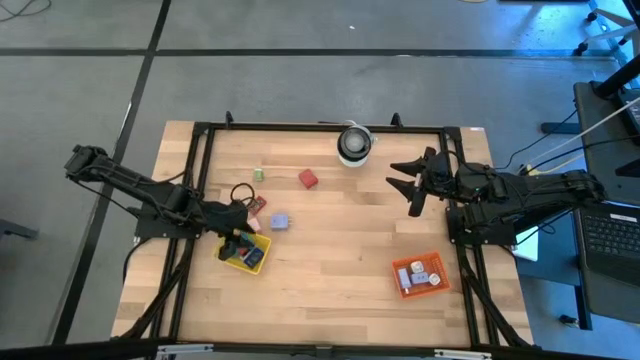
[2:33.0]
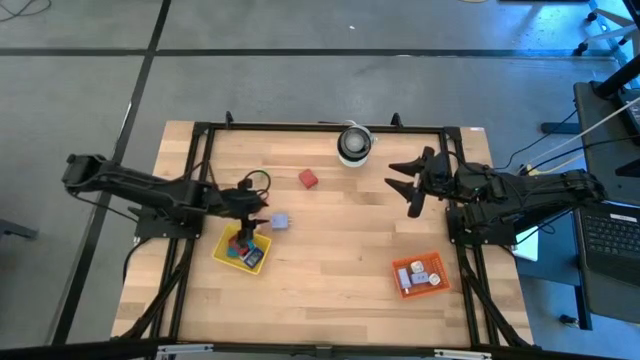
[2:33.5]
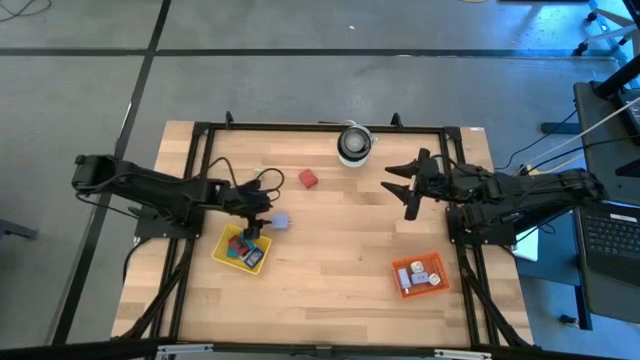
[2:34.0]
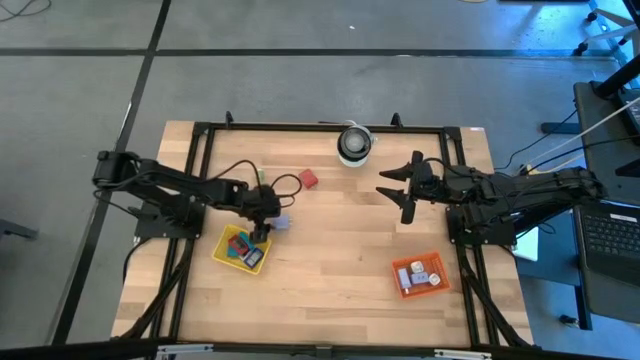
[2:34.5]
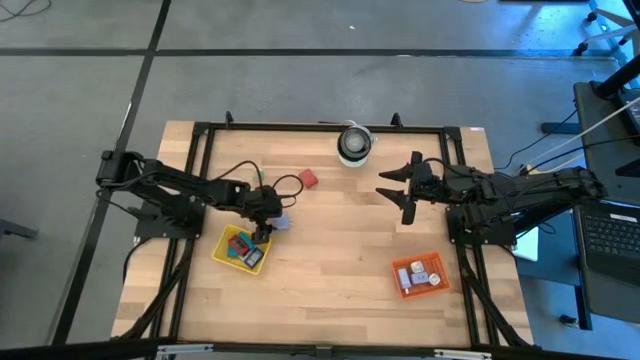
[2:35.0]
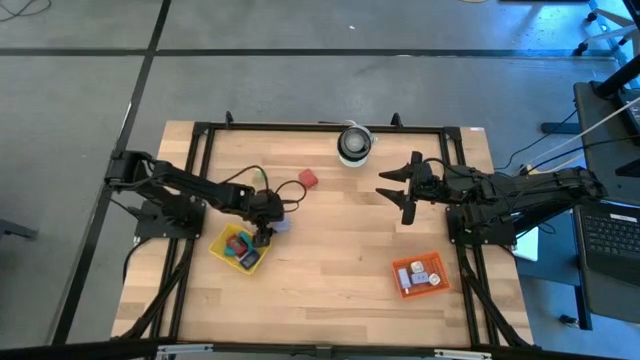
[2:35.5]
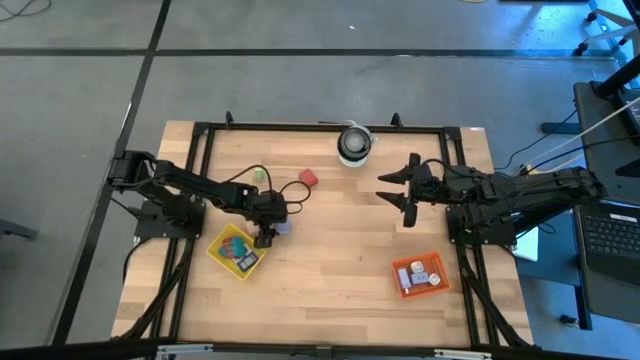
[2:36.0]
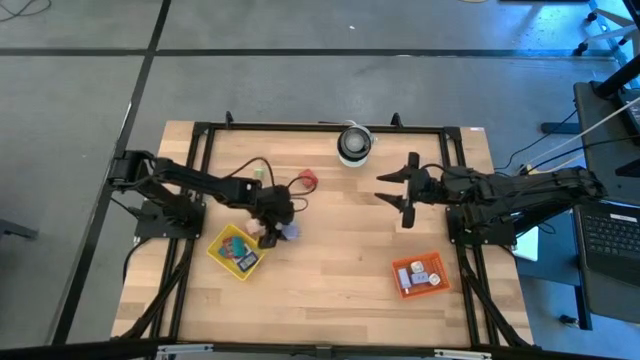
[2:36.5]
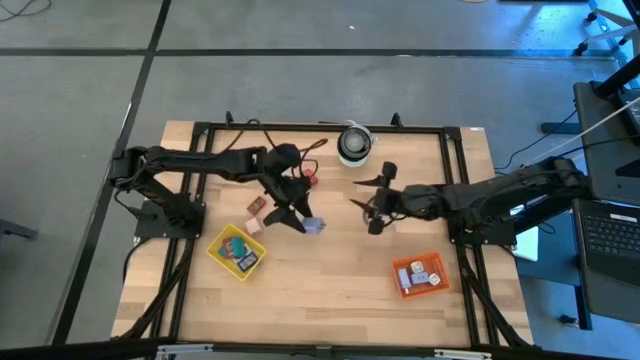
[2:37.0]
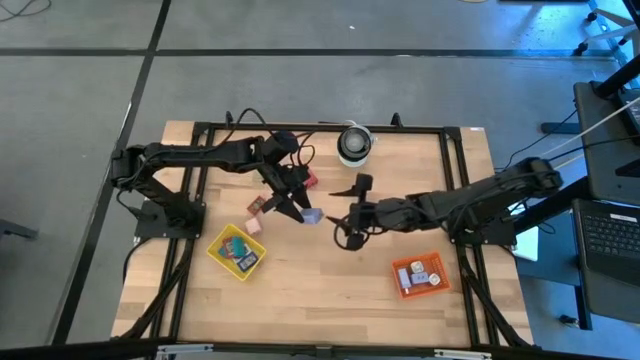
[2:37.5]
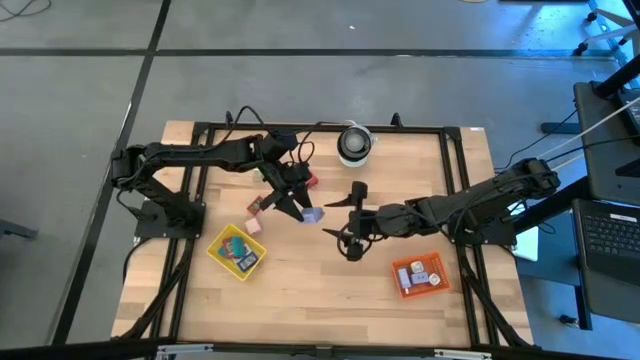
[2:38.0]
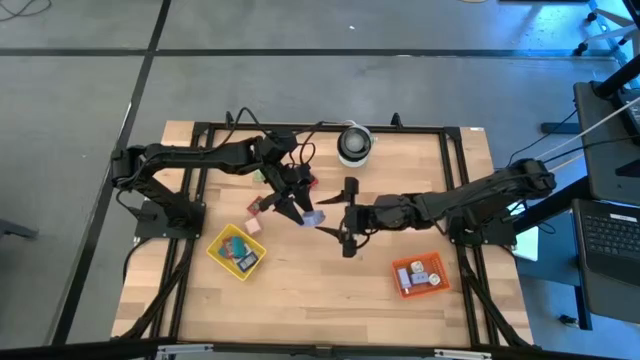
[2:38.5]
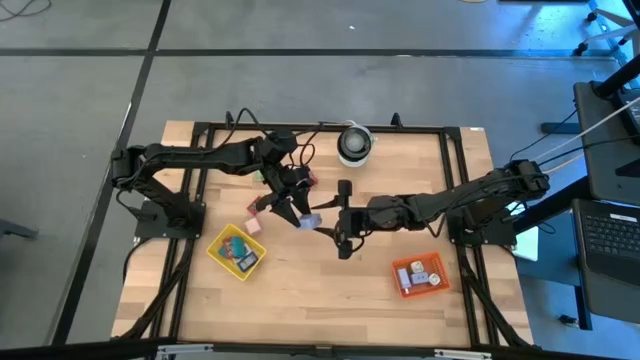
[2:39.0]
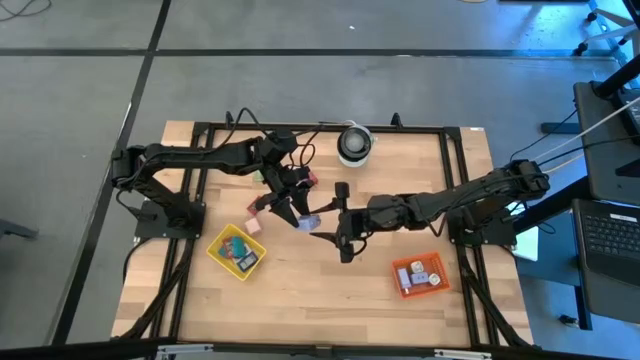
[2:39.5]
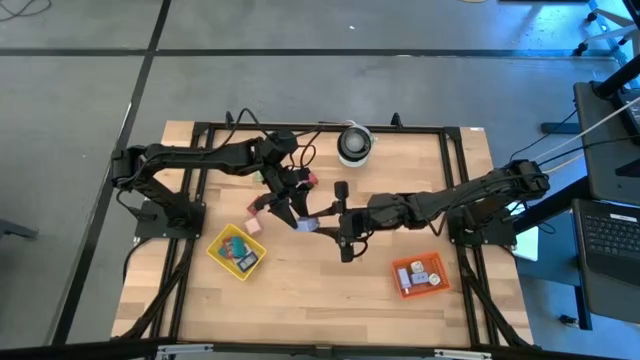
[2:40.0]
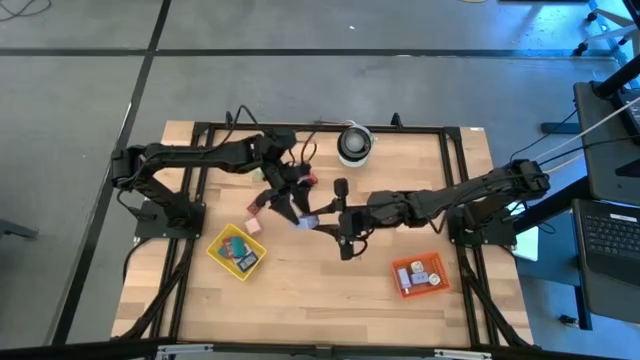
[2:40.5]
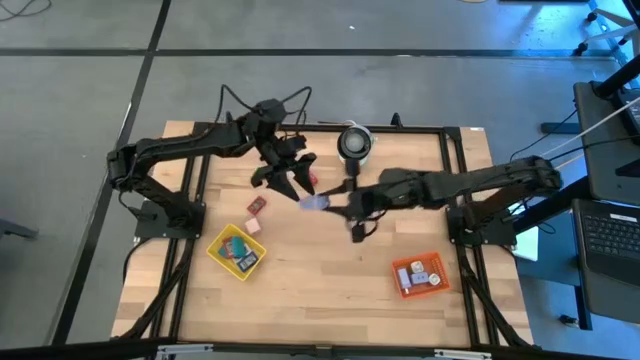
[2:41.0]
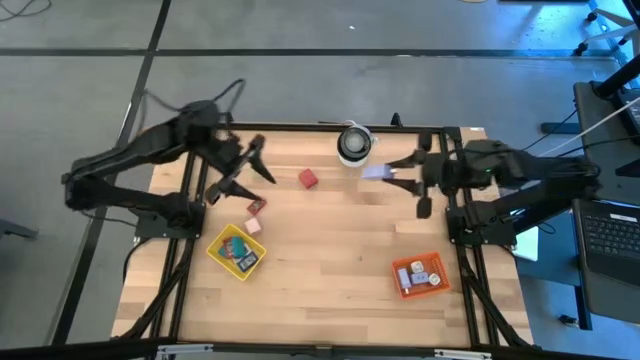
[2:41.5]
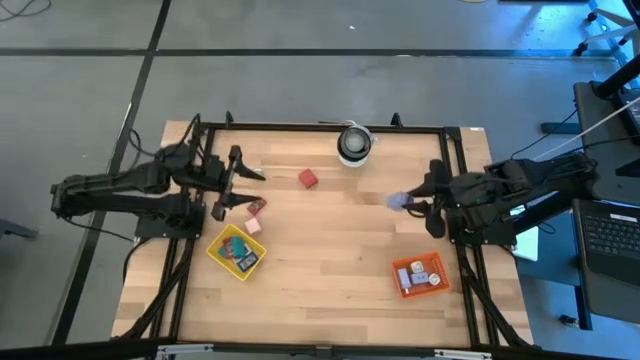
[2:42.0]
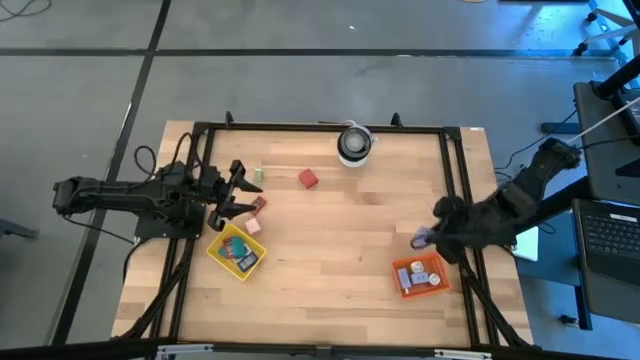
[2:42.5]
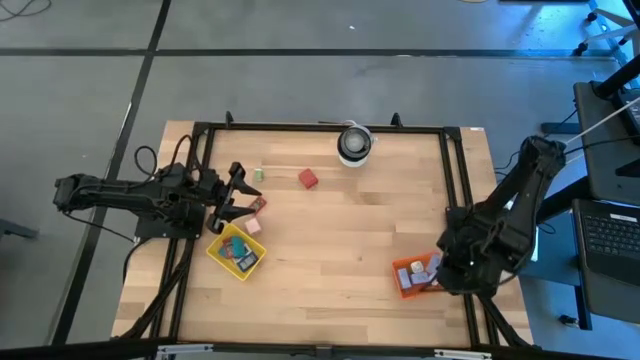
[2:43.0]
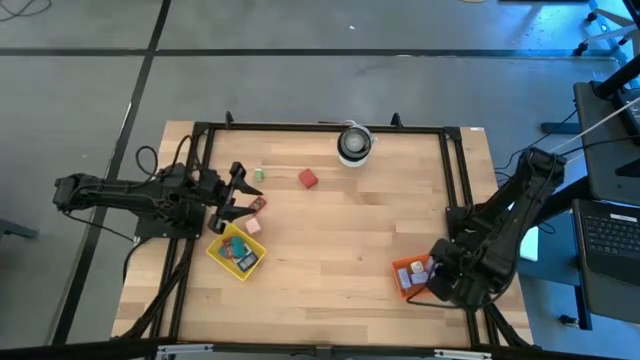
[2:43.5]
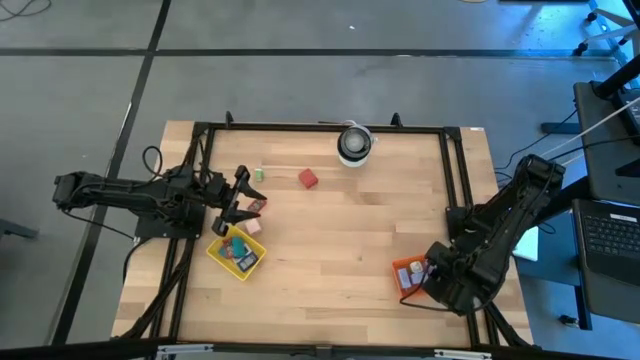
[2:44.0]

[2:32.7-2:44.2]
Task: Pick & Place Office items
Put the violet charger adapter into the orange bin
